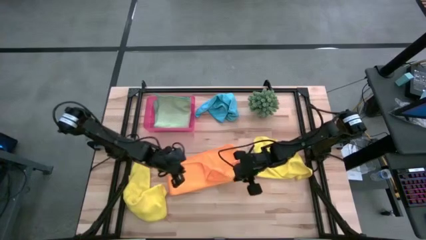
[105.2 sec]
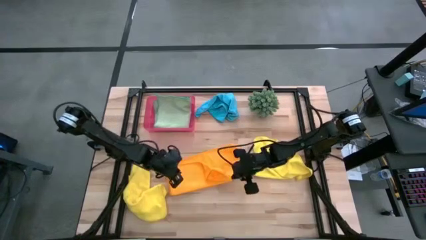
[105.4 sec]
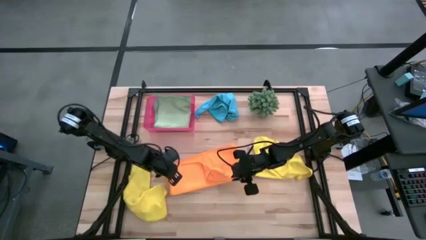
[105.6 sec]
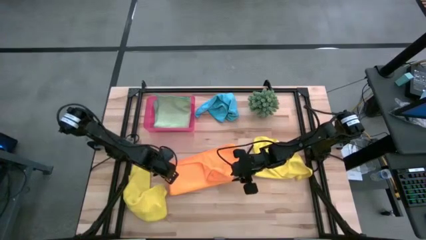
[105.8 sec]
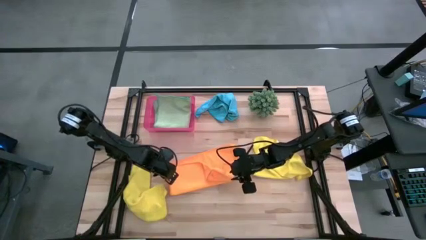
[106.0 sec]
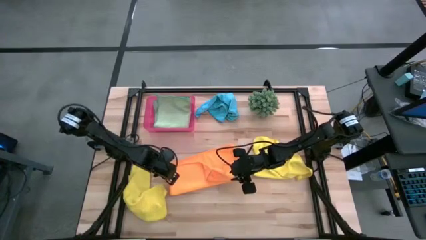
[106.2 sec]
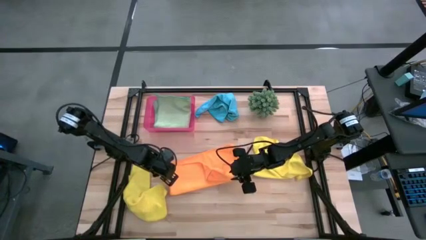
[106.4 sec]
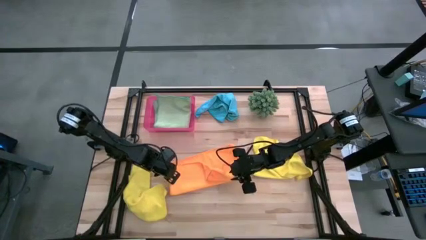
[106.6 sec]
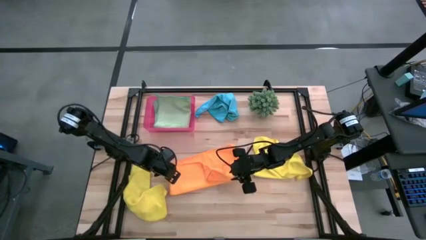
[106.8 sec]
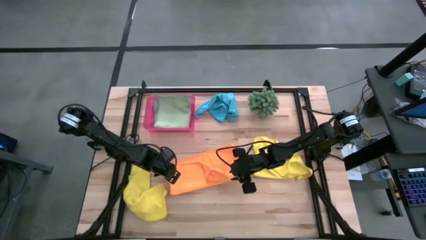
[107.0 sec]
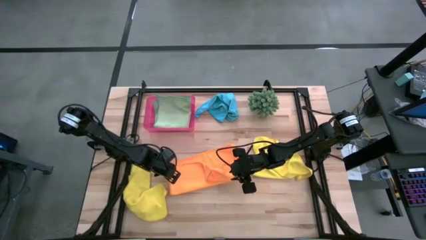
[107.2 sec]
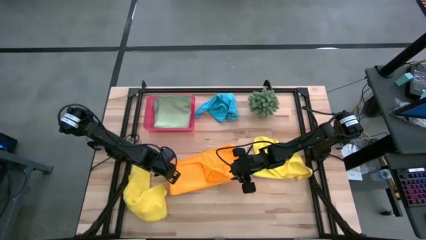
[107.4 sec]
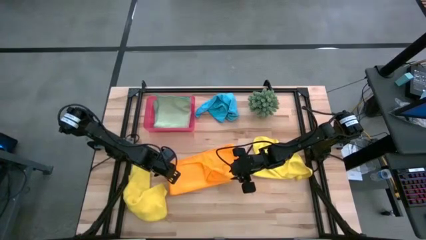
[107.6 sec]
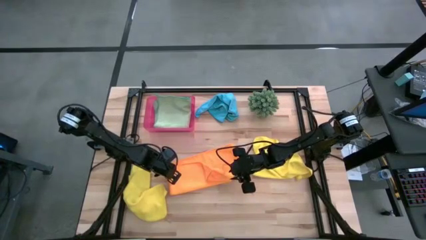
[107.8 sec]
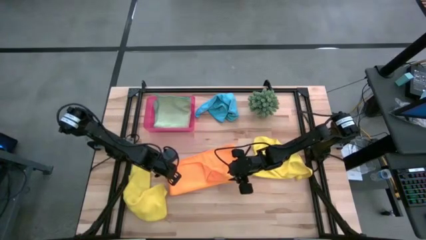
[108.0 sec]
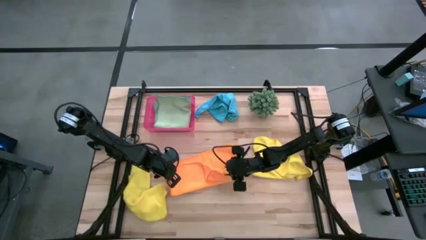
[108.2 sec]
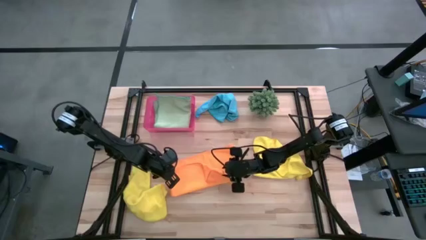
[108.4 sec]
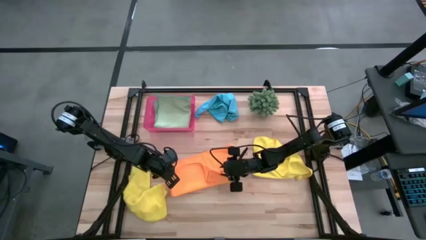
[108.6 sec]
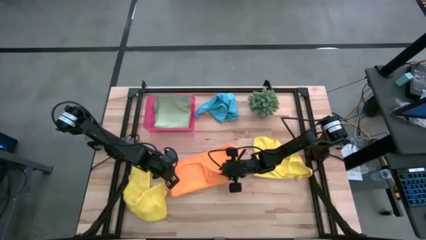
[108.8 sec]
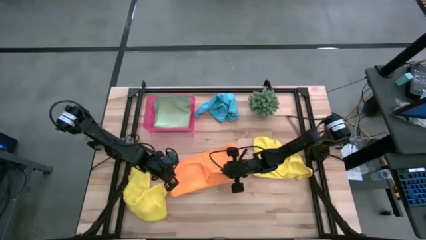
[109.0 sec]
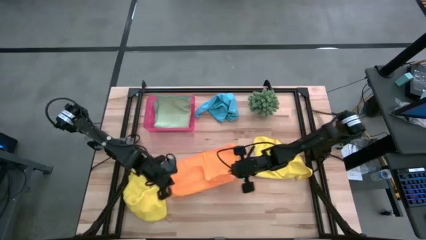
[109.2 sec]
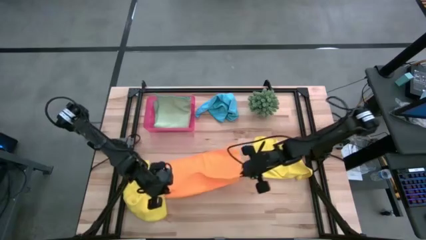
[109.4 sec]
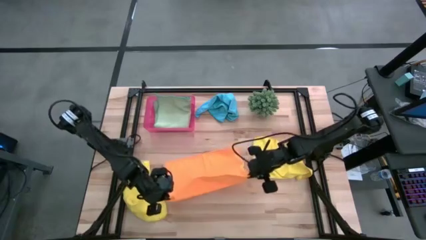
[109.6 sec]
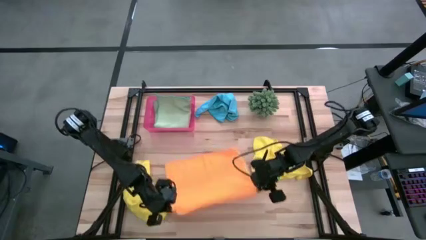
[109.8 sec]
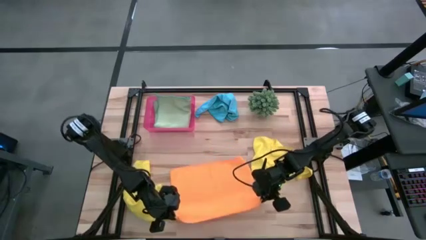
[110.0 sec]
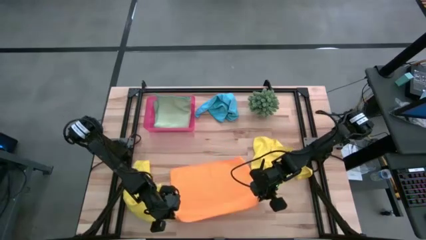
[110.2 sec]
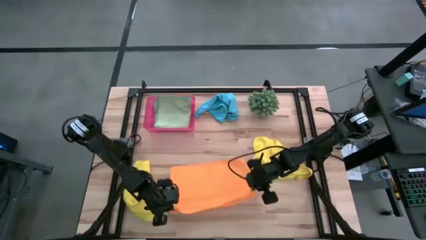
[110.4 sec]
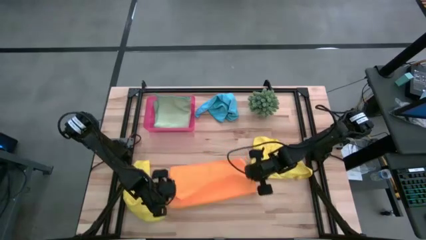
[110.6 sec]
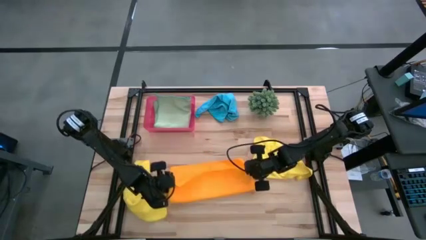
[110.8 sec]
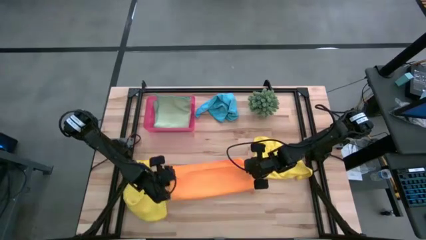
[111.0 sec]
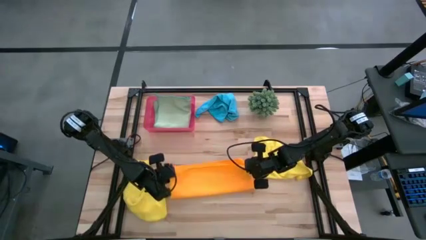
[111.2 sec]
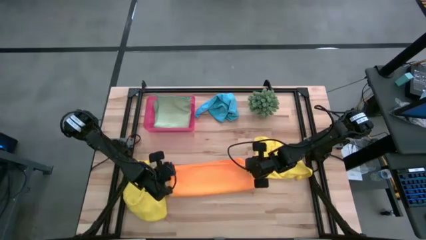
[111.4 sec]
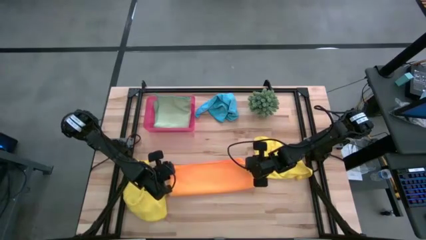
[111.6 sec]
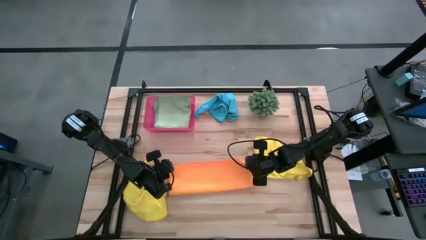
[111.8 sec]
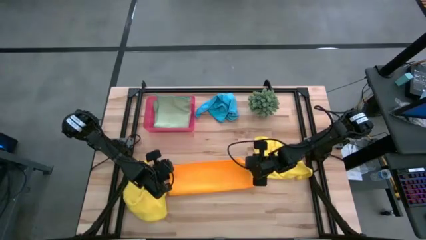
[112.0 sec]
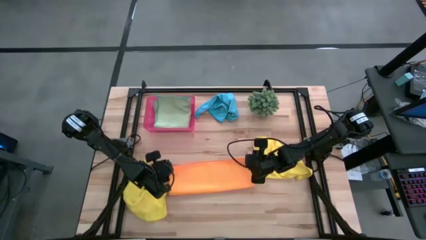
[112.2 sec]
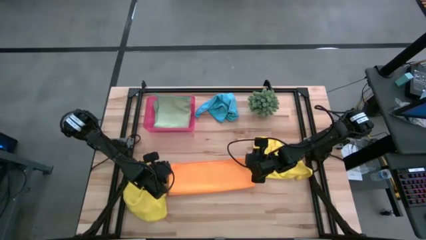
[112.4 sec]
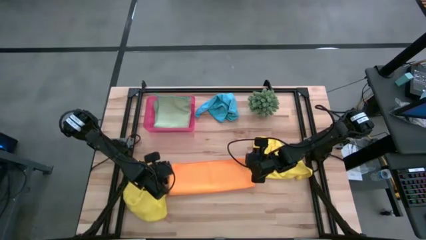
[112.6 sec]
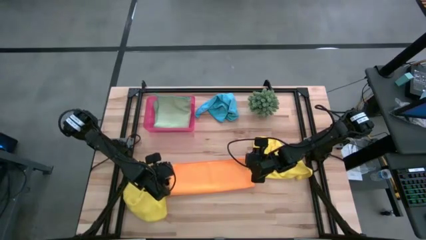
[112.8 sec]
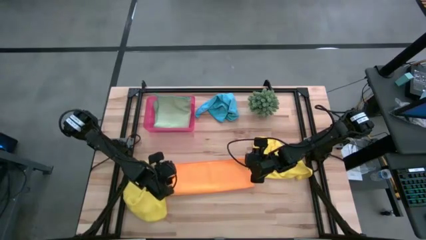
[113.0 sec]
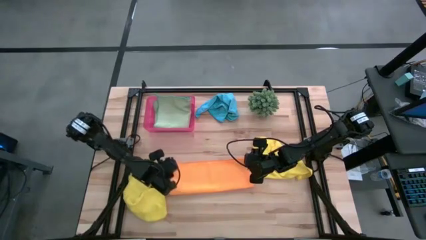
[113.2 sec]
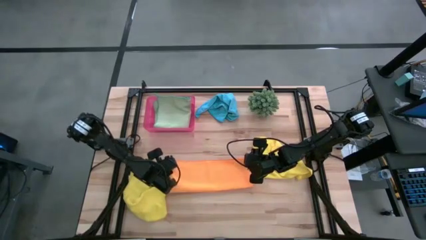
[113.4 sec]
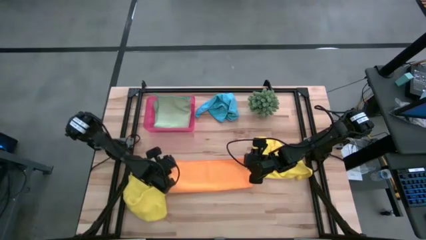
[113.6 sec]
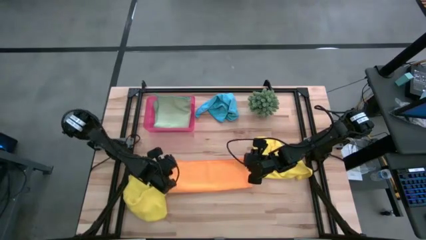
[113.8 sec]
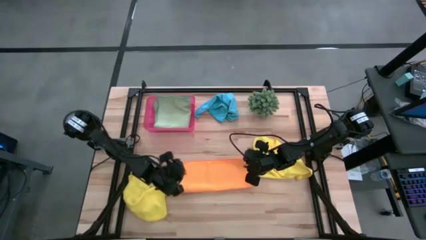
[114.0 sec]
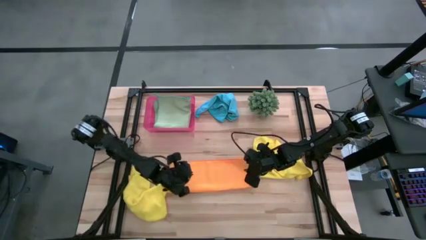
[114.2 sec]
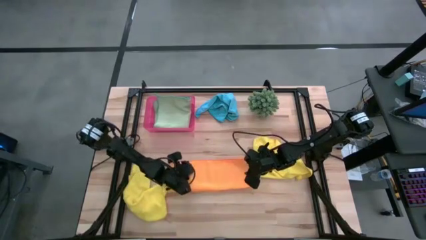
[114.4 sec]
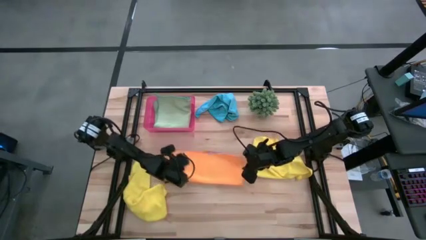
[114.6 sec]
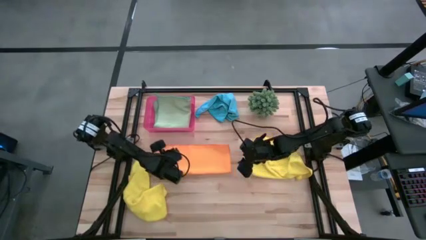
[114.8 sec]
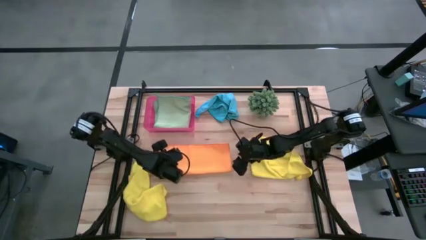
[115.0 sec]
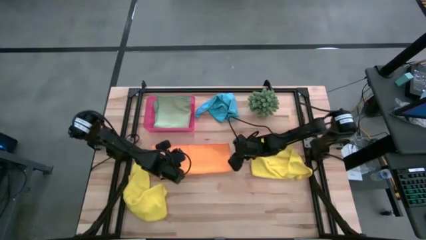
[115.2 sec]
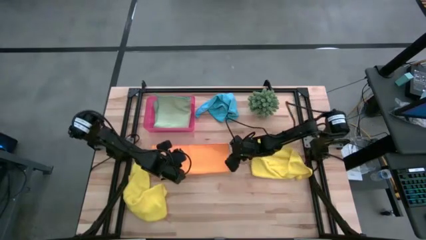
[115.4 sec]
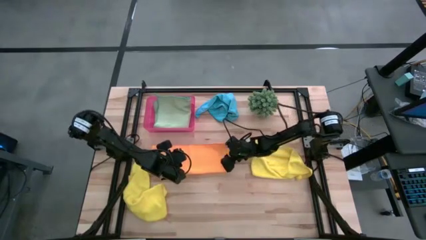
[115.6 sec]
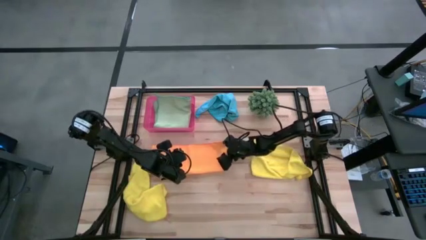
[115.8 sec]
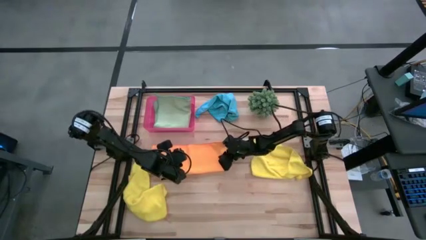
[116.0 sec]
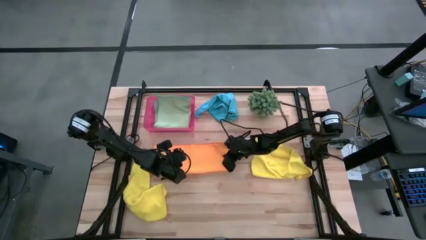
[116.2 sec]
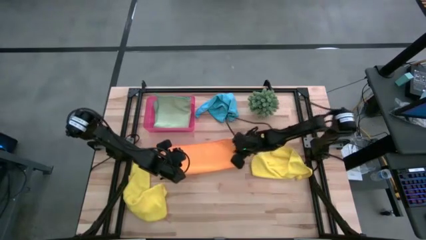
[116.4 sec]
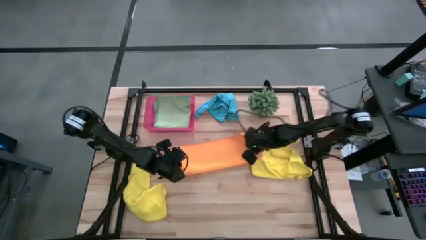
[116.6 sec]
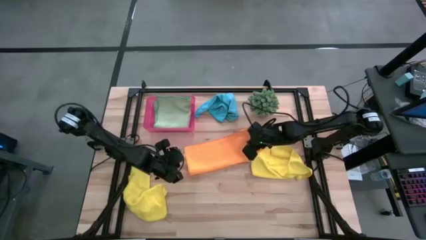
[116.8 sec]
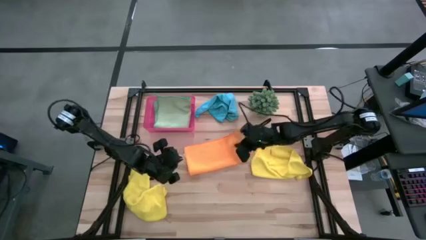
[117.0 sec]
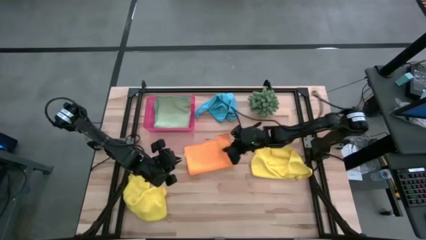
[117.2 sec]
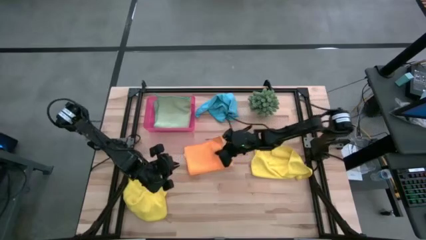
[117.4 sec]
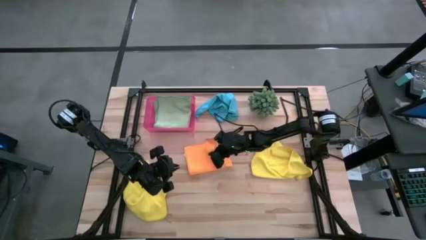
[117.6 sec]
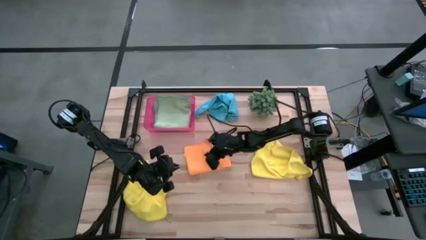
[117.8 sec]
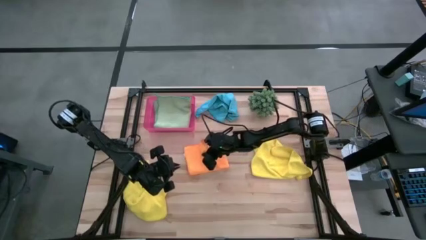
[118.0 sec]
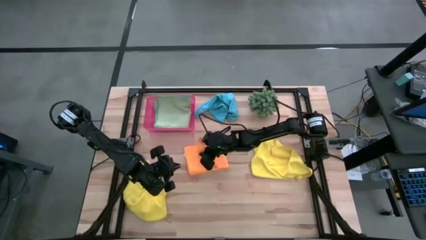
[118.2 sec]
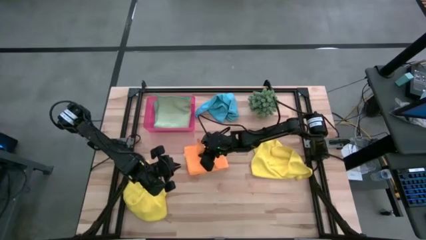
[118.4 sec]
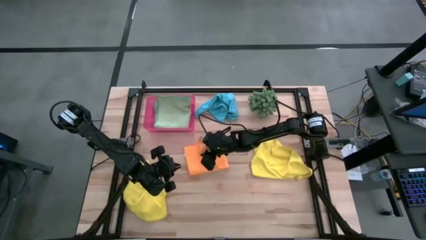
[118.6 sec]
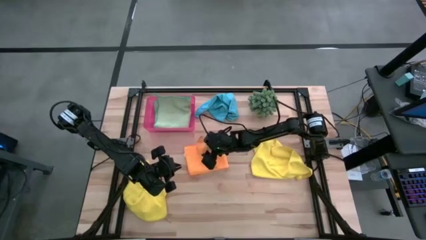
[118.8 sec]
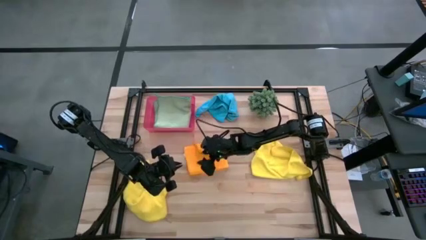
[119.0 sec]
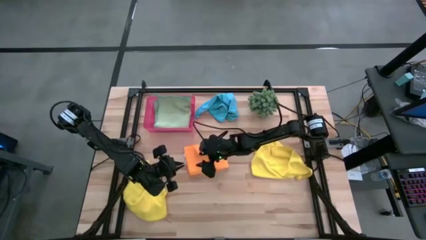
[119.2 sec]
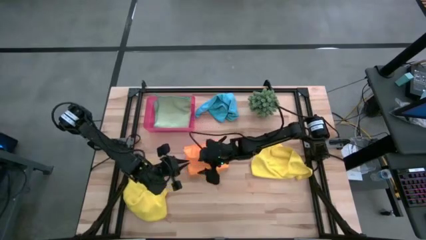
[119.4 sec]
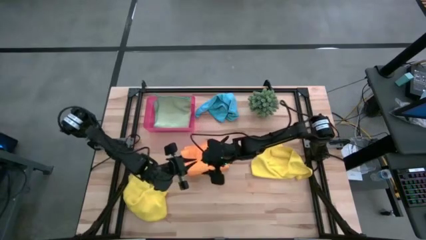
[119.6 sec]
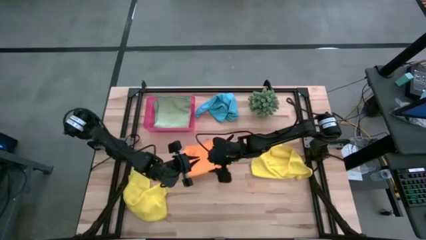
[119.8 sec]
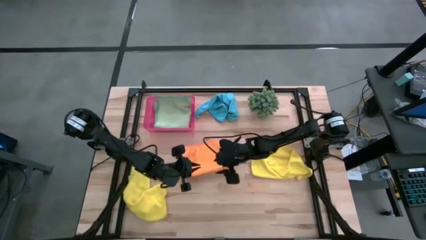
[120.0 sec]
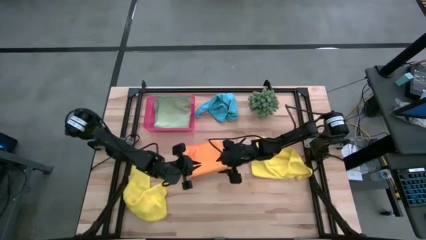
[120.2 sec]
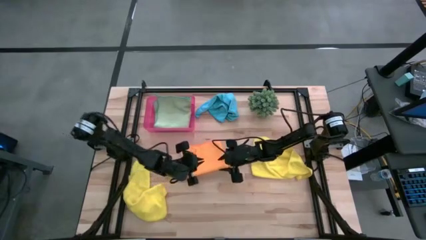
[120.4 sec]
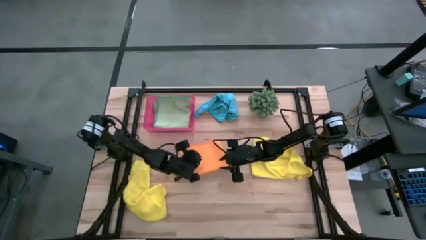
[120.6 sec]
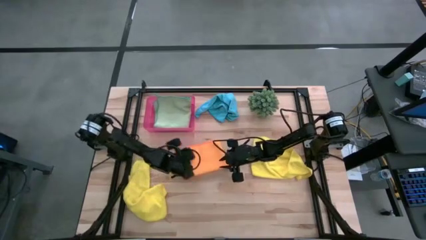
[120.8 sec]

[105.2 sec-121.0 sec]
Task: Fold microfiber towels
Fold the orange towel
